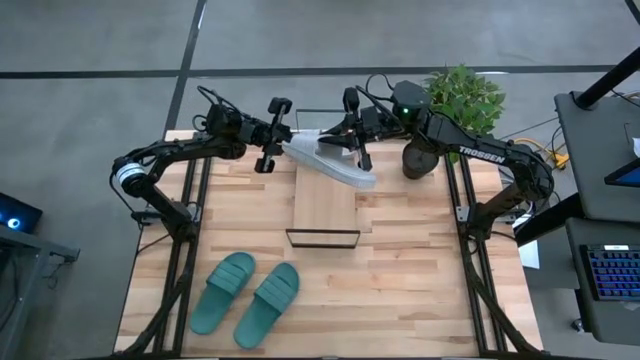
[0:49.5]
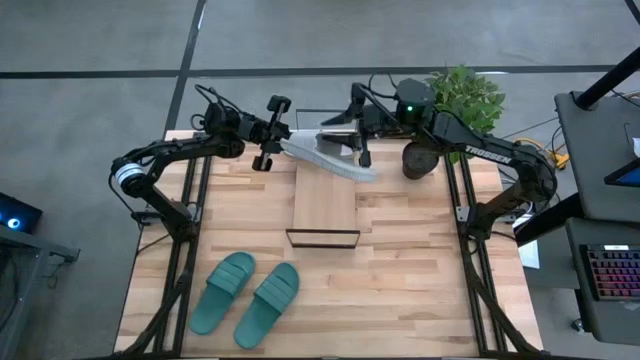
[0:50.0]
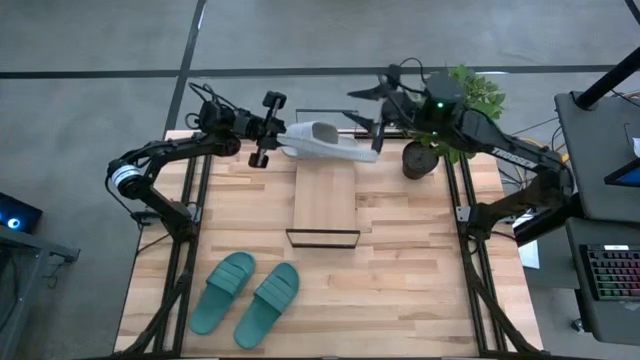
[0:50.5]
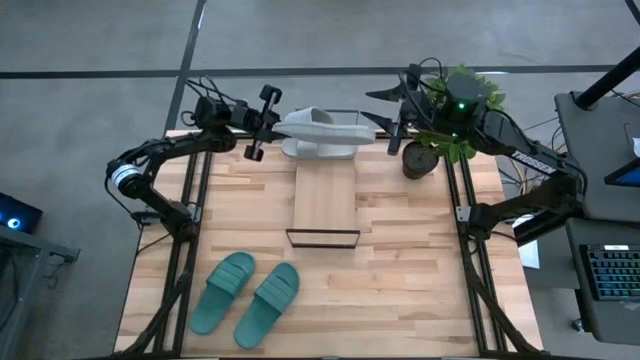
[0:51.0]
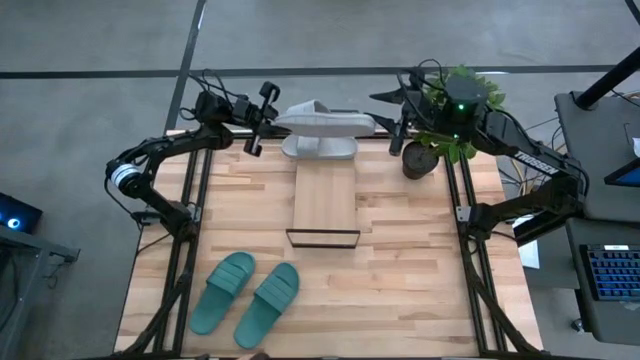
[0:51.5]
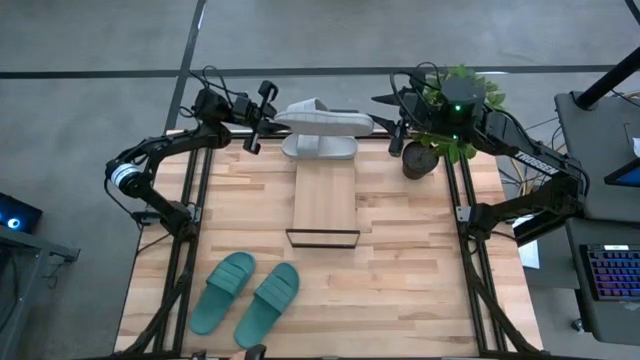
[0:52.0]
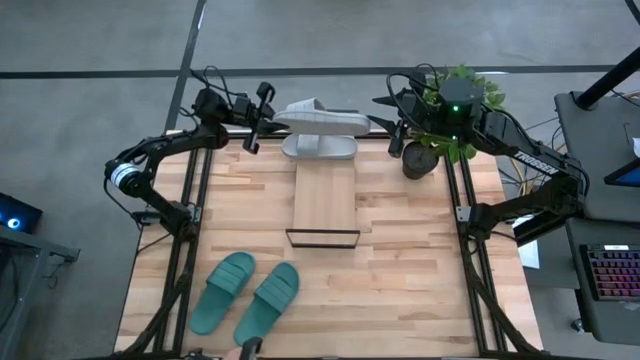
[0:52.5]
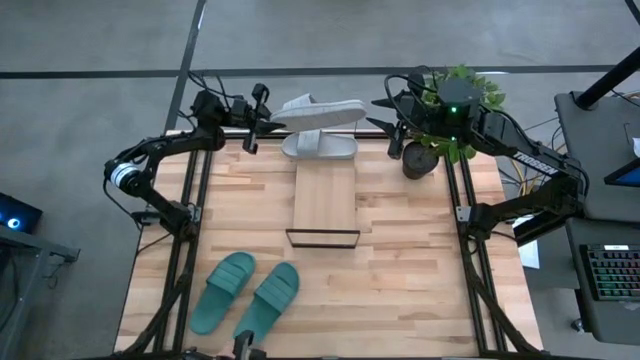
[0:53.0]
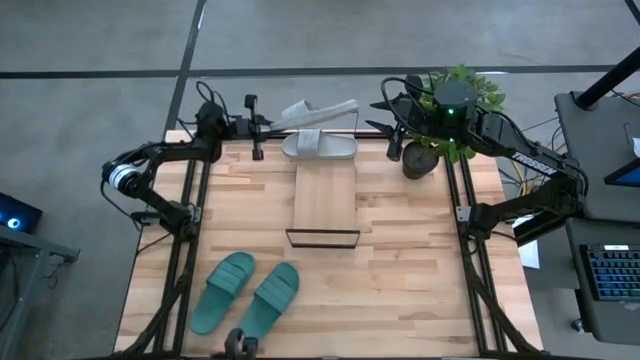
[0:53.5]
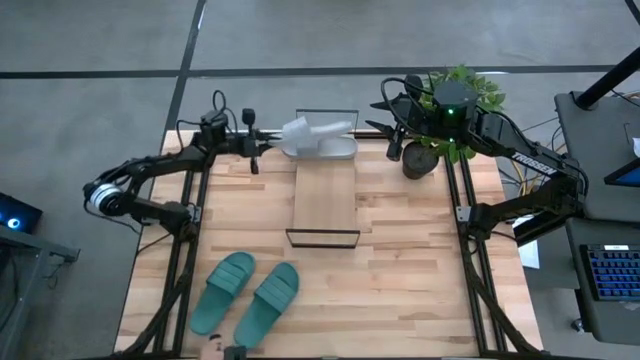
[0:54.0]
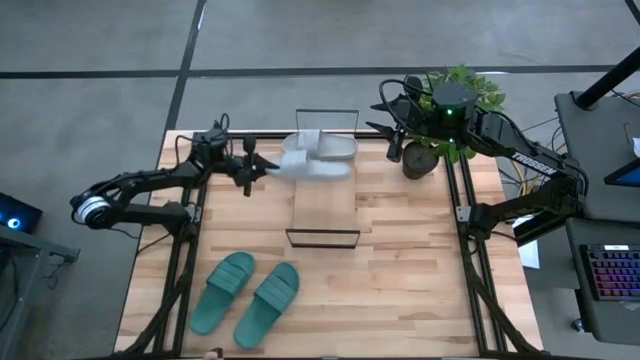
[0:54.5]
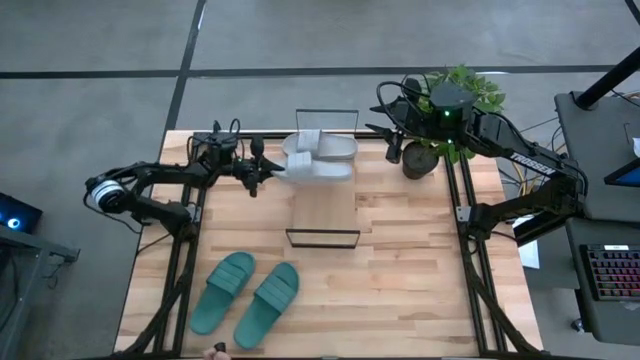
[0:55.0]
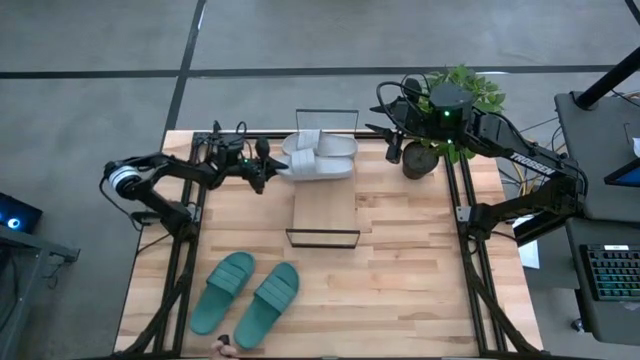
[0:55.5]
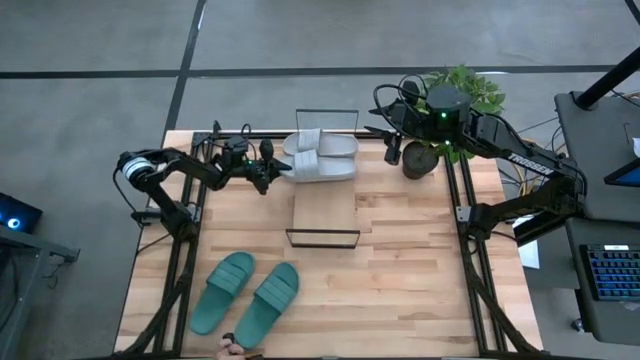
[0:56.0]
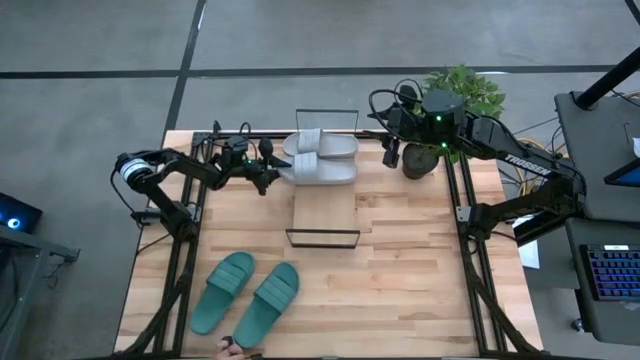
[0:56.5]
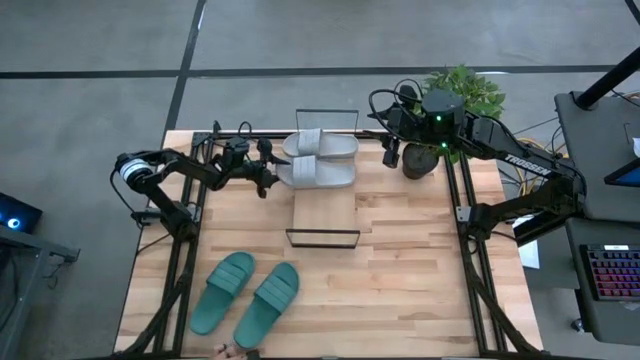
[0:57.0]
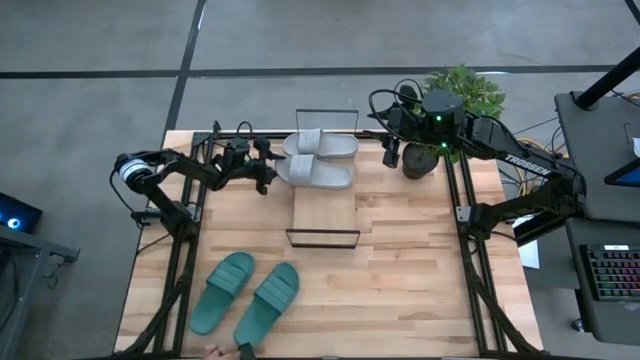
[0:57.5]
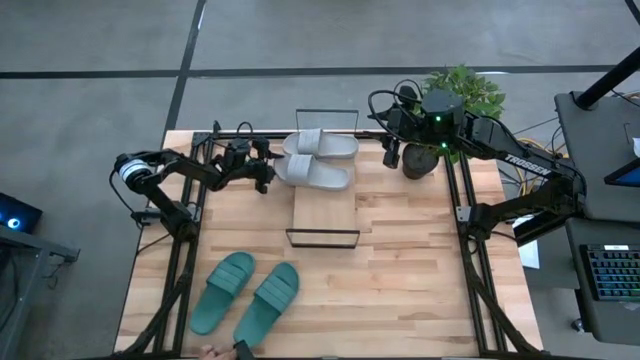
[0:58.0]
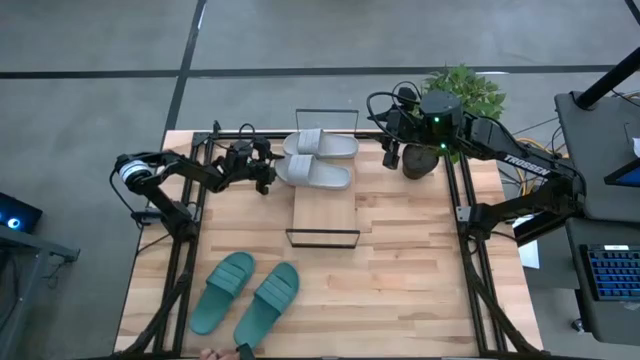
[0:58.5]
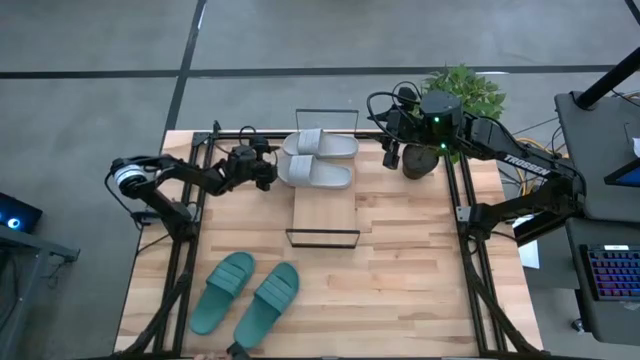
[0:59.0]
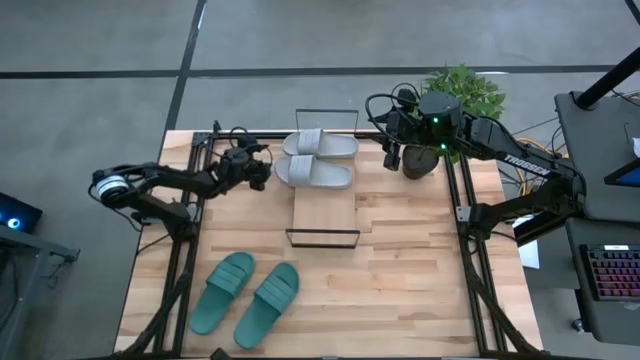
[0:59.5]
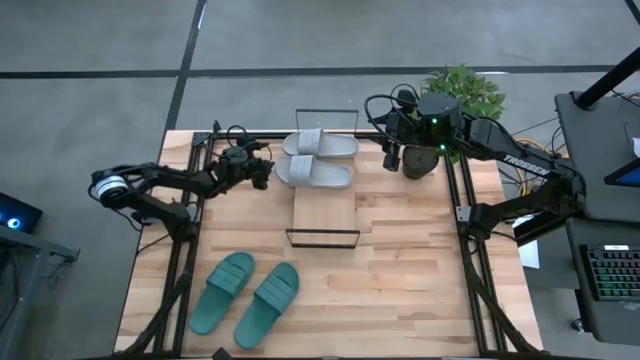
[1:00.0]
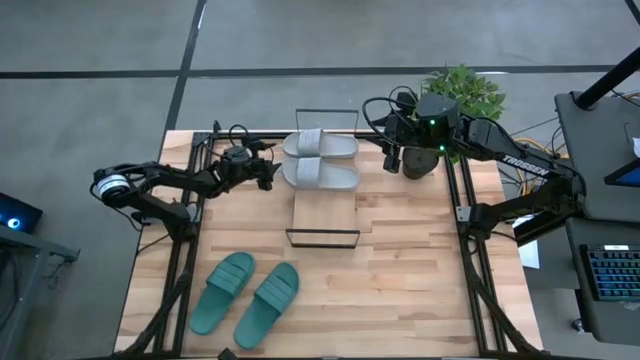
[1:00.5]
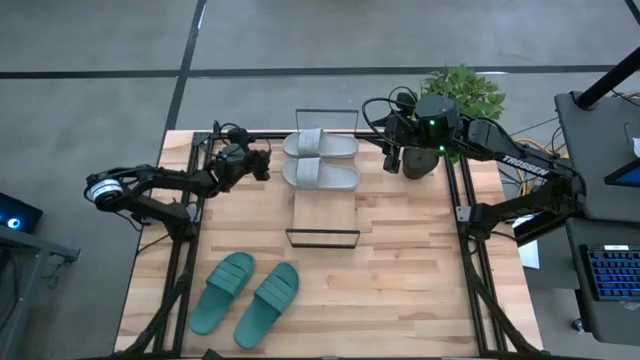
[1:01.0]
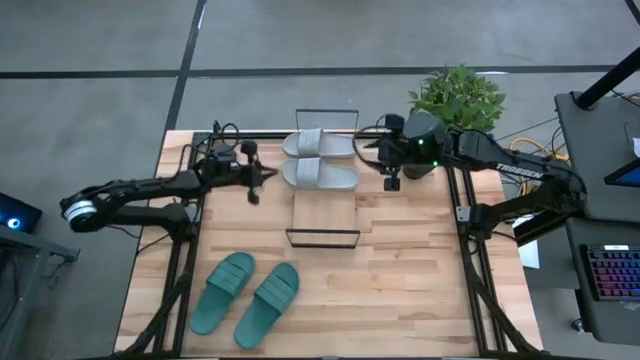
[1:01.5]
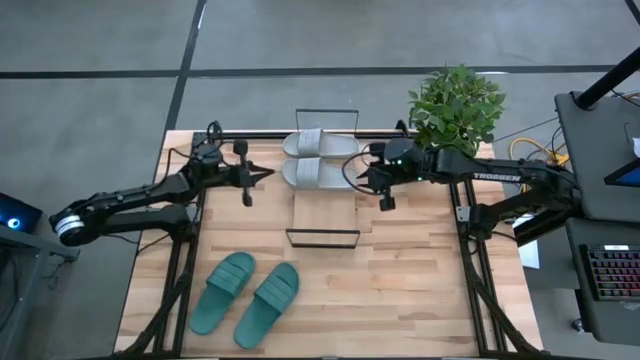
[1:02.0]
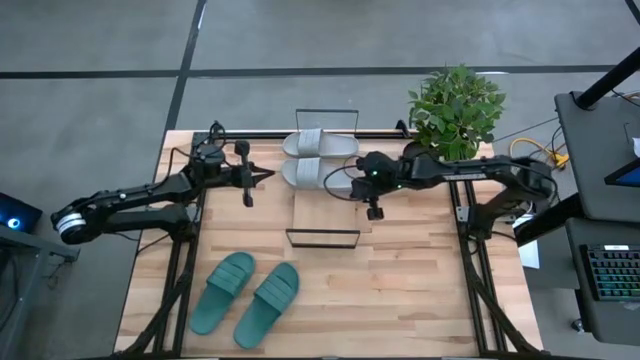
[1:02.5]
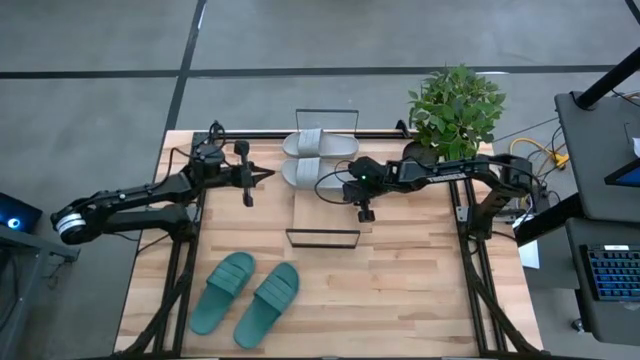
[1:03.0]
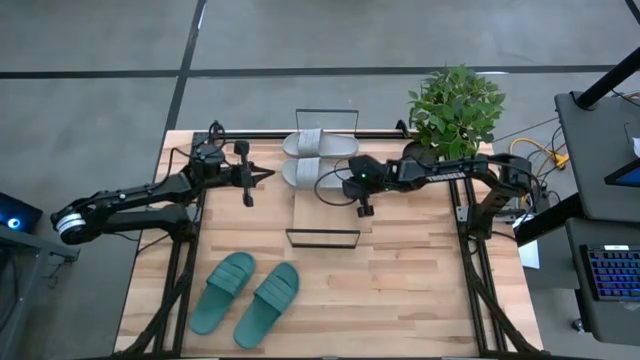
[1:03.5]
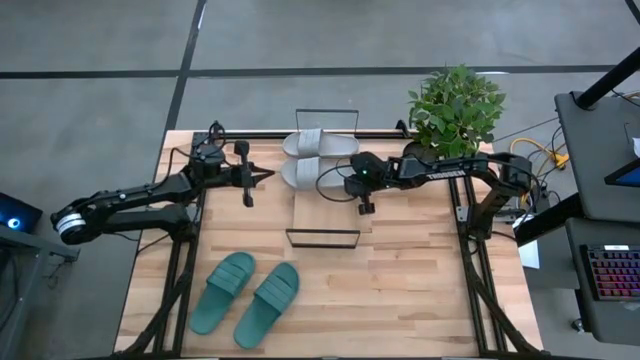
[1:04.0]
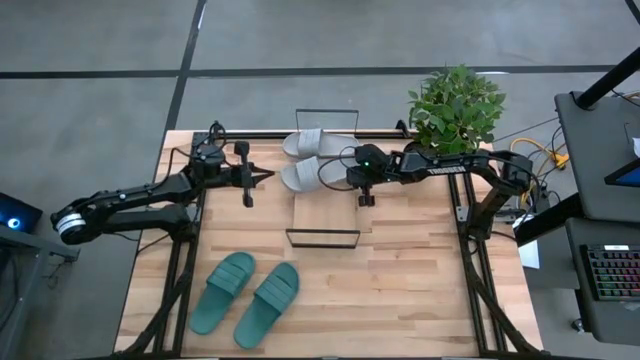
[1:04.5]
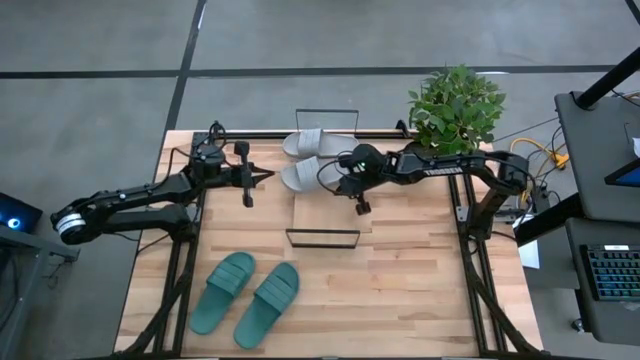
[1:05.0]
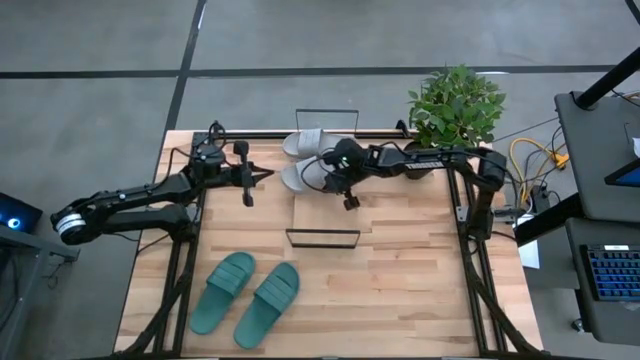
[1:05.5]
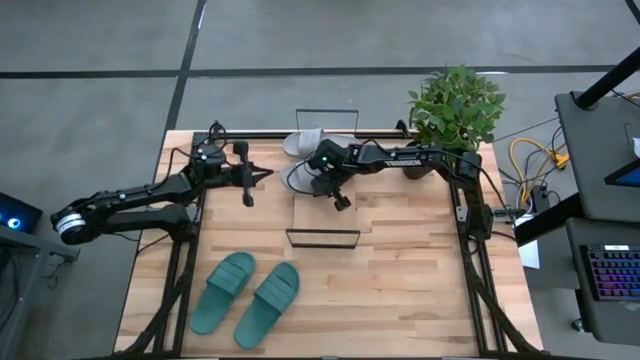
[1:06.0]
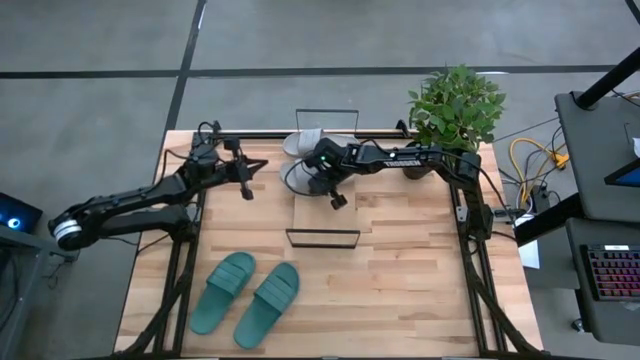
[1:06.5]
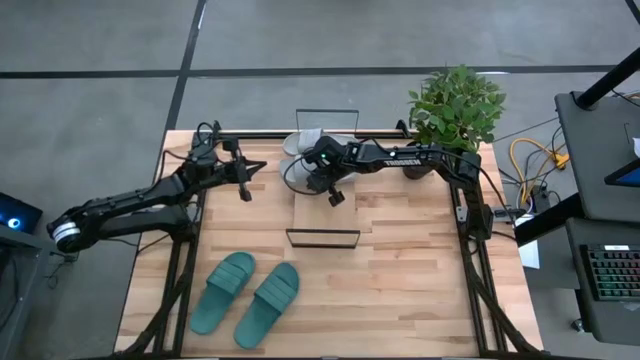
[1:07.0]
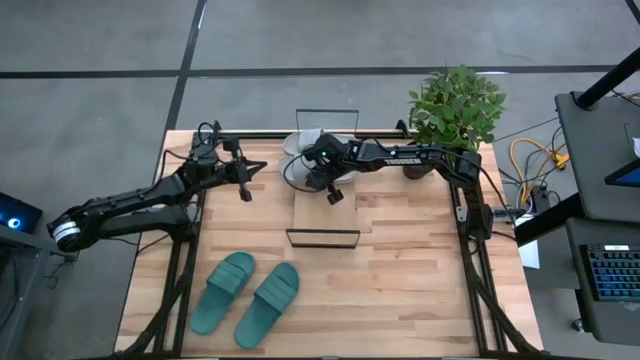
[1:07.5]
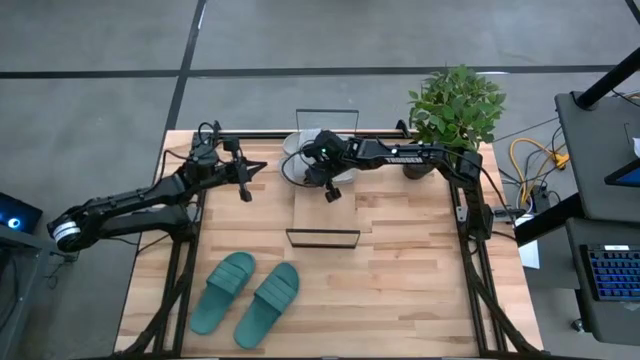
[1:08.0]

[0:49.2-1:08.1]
Task: Pick and place slides into the shelf
Put the gray slipper on the shelf

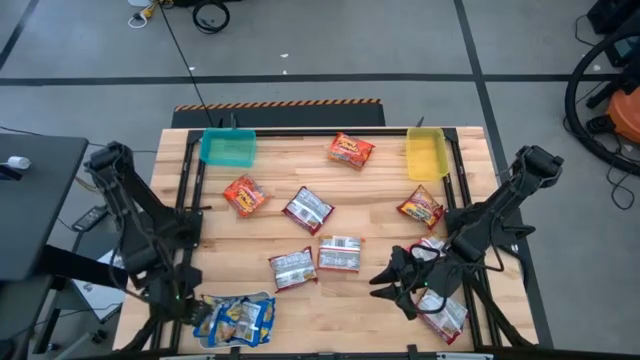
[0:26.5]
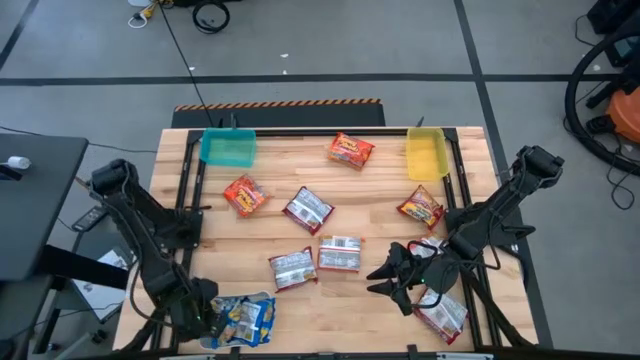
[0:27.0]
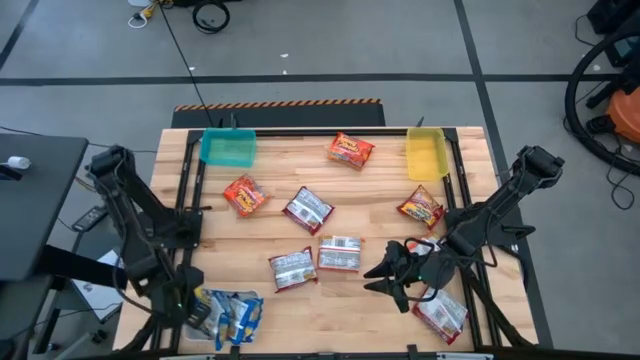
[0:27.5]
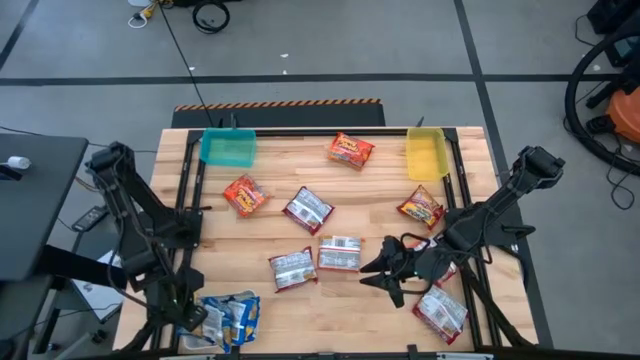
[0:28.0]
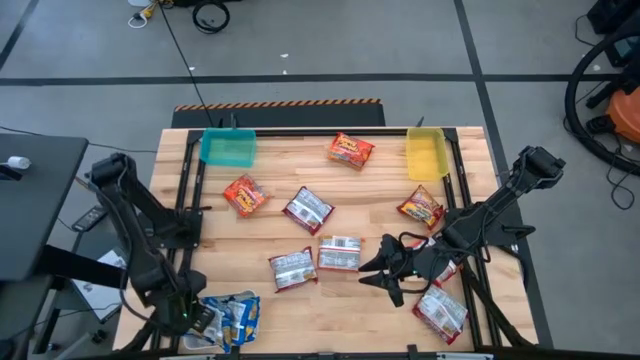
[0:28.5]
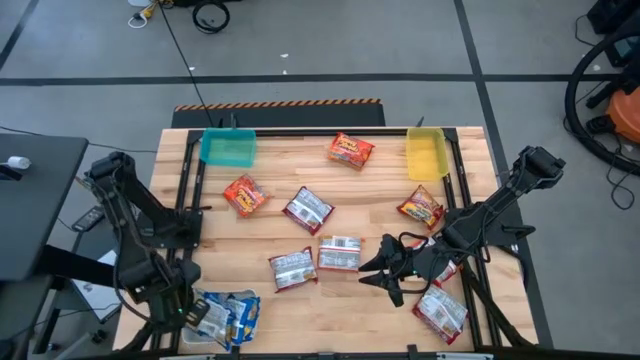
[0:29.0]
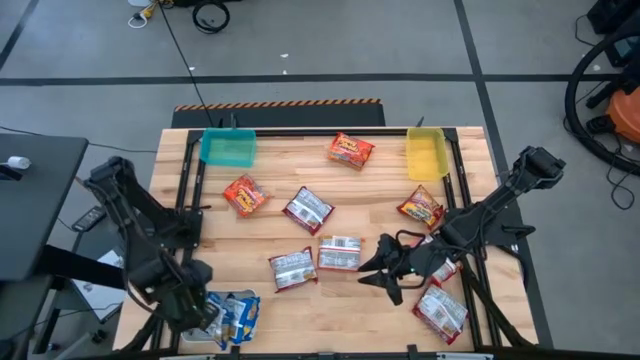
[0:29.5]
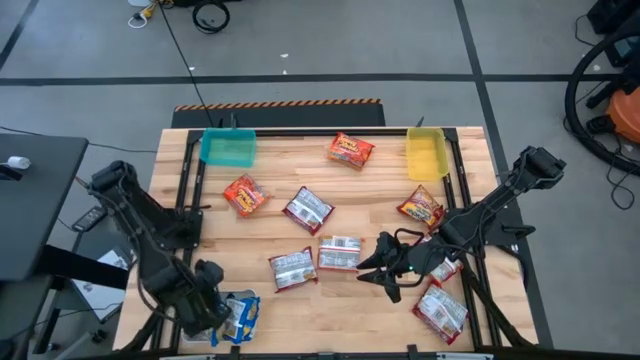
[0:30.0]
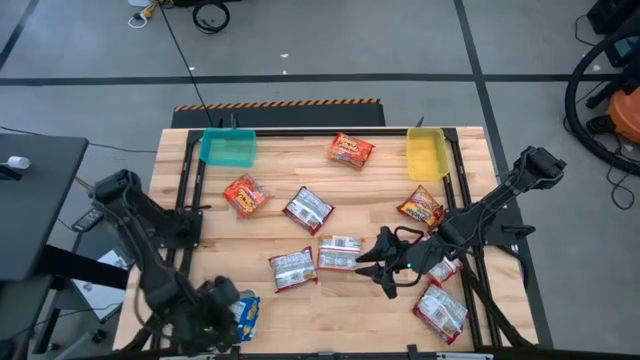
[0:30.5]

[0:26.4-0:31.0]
Task: Sort Maruchan noodles
Adjust the blue noodle pack in the white bin
